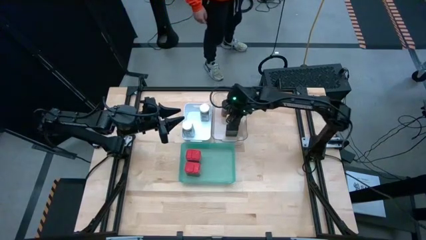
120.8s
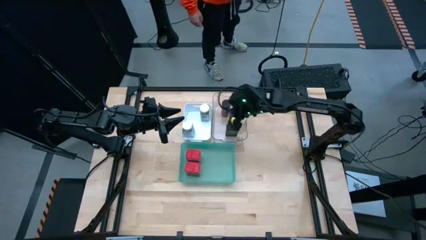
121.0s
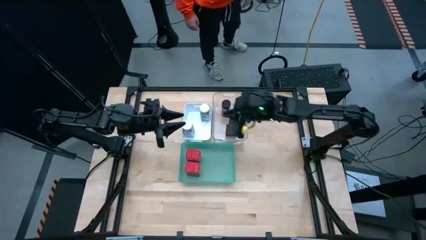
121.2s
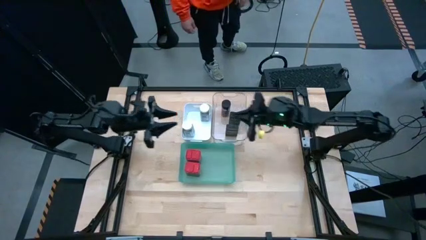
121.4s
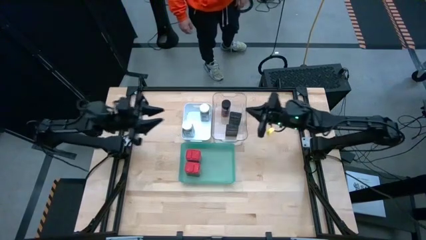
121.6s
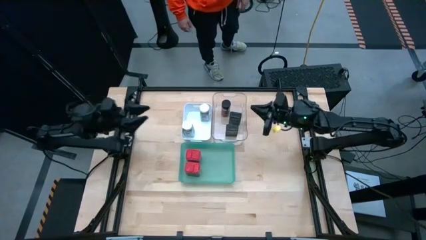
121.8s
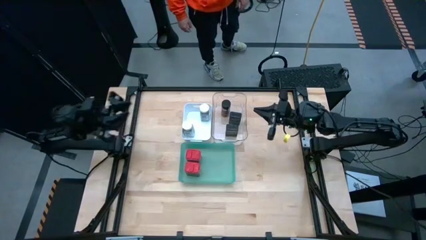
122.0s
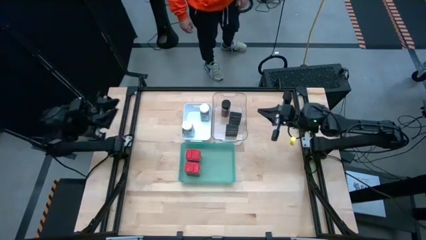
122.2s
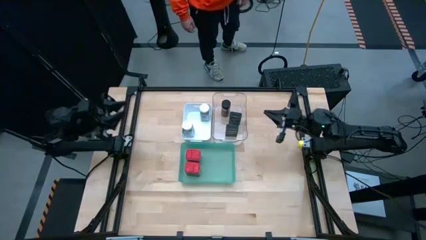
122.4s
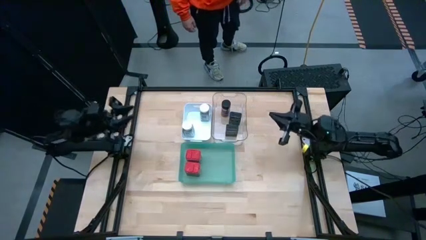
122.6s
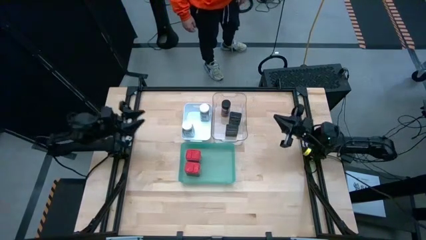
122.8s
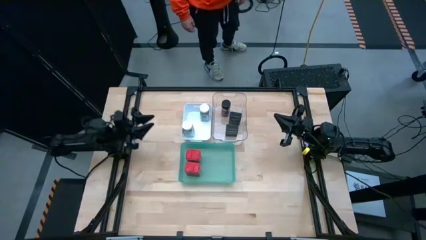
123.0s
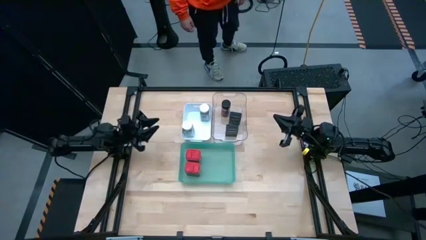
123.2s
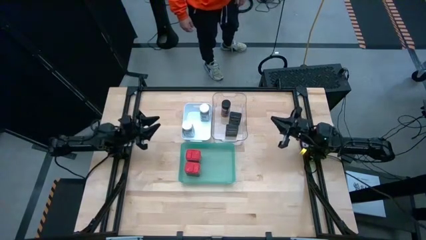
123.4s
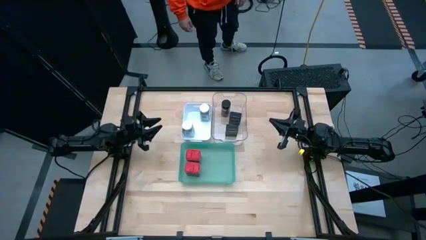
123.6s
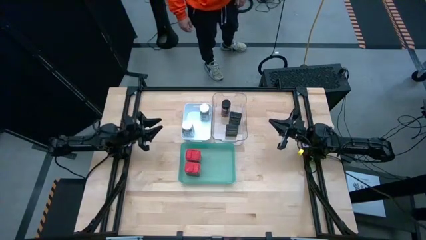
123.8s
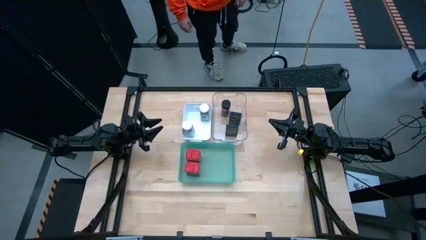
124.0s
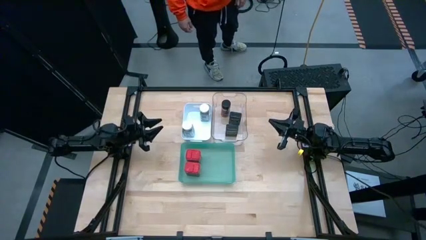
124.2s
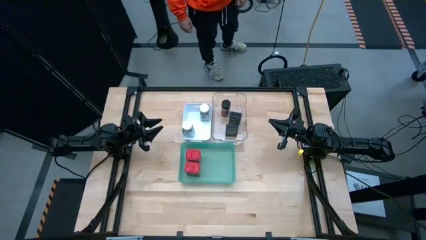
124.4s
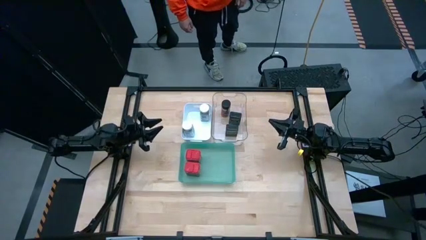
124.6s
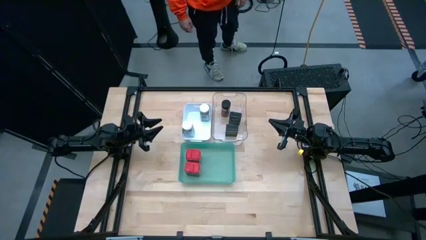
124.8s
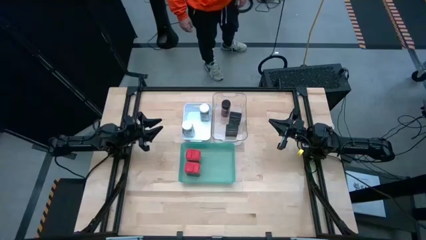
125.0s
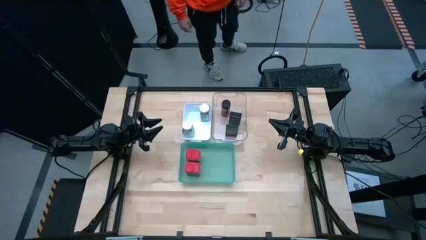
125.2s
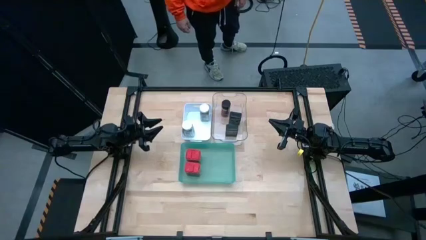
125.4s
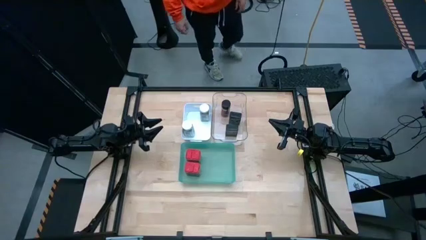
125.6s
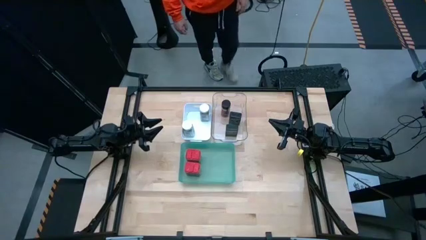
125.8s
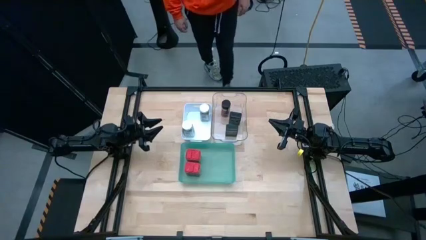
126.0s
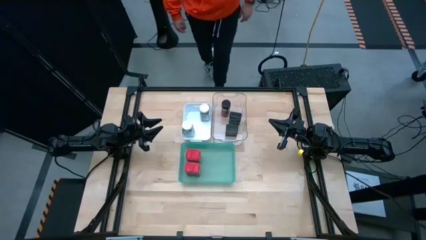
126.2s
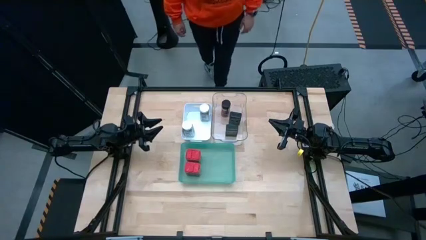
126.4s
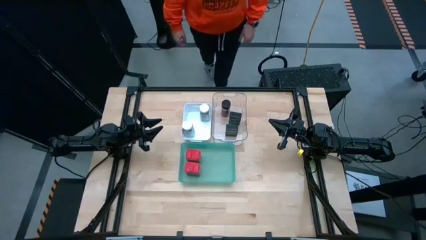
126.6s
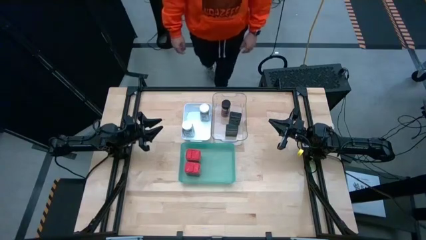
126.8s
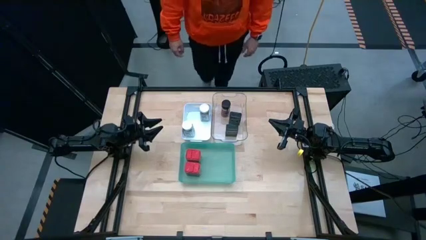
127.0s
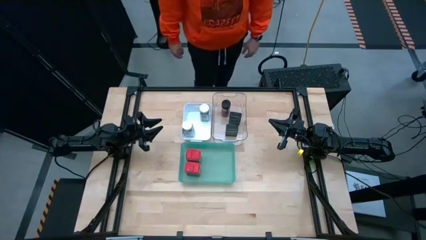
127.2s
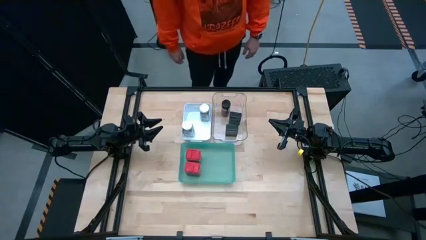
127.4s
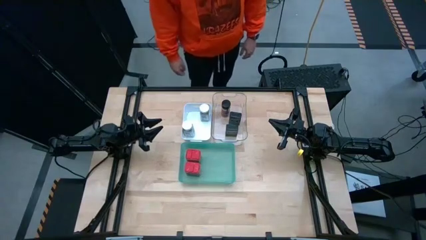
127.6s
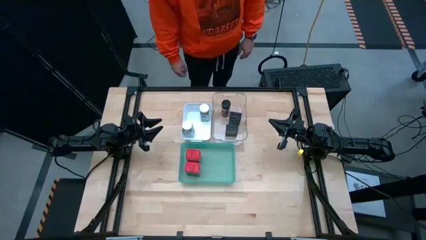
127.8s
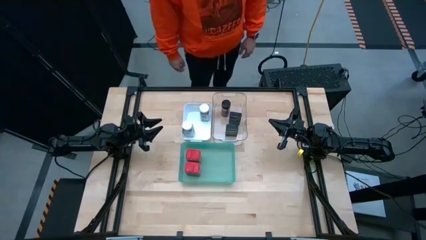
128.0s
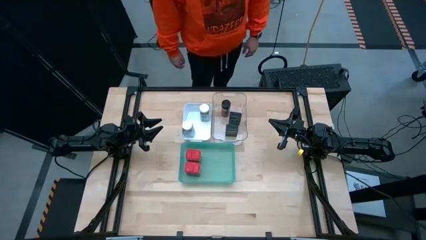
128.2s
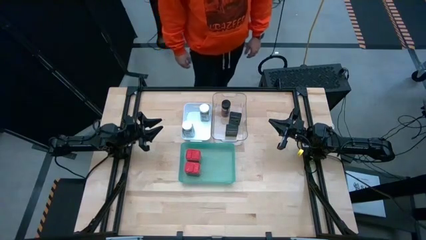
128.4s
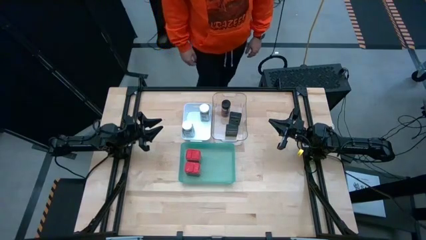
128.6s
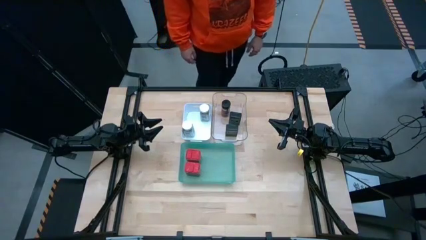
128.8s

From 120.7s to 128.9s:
Task: Sort spices by type
Return to Home Position

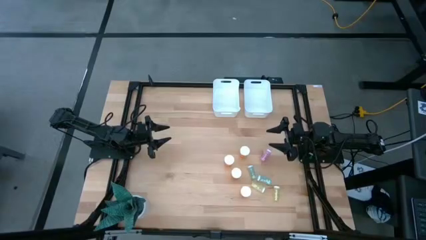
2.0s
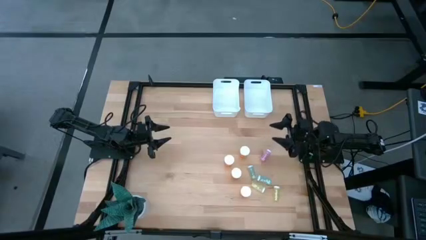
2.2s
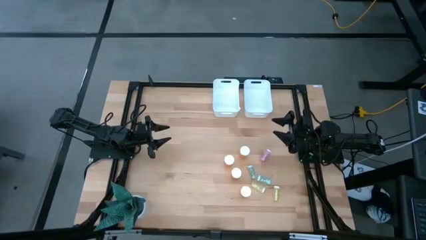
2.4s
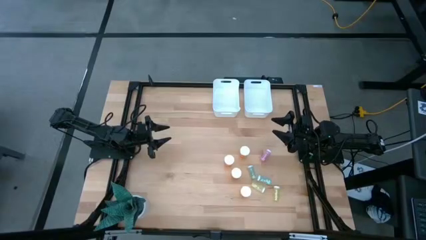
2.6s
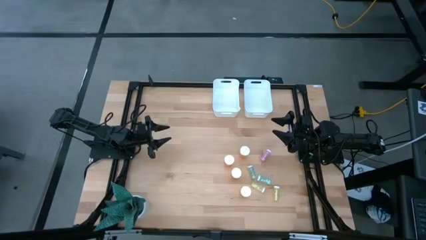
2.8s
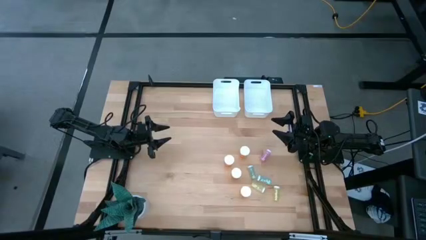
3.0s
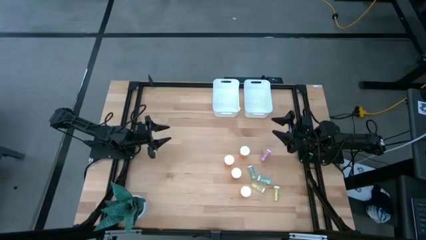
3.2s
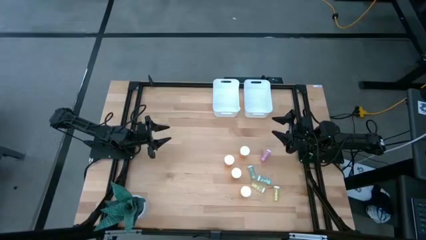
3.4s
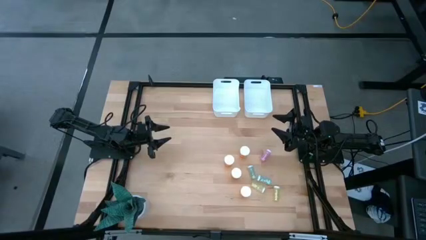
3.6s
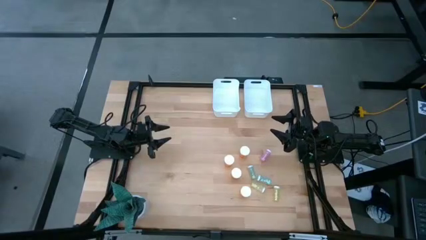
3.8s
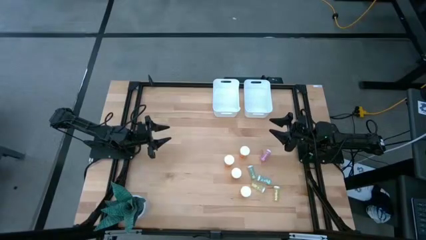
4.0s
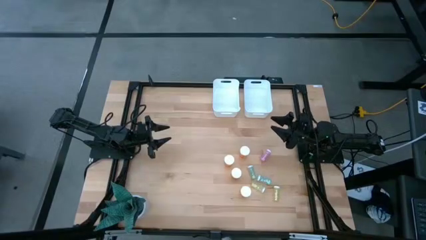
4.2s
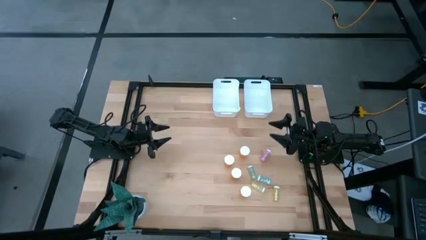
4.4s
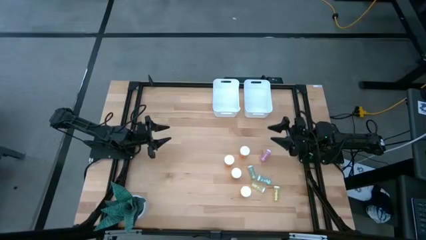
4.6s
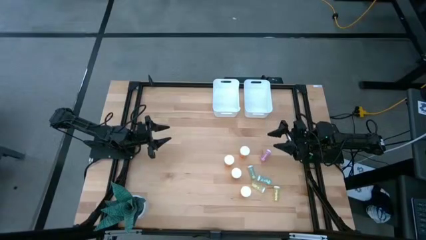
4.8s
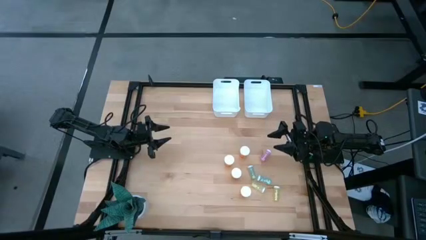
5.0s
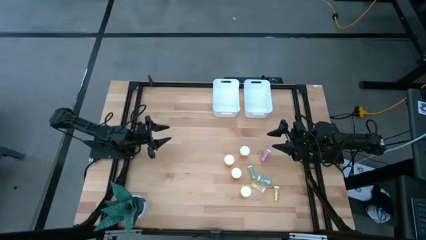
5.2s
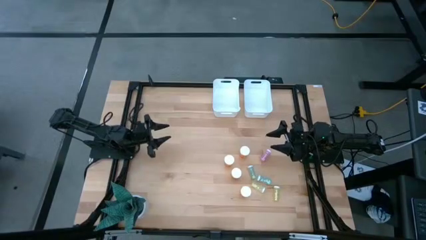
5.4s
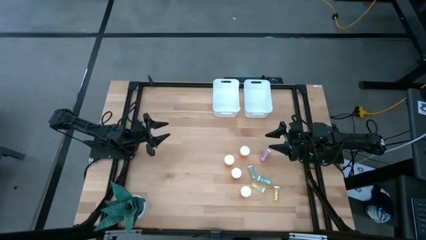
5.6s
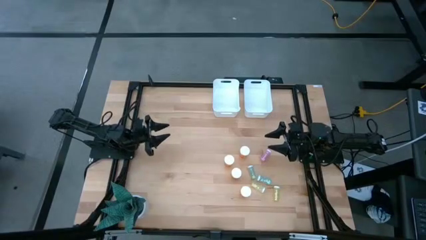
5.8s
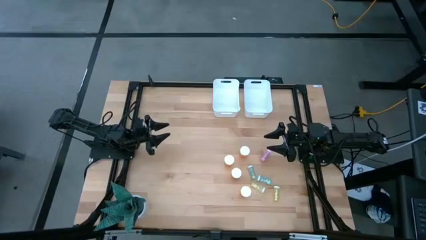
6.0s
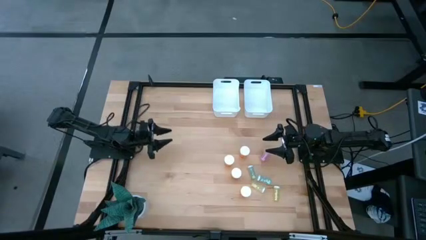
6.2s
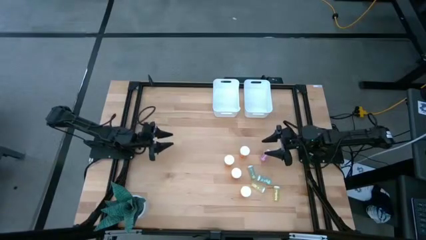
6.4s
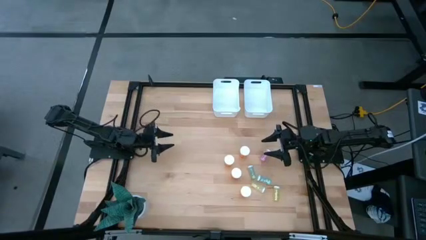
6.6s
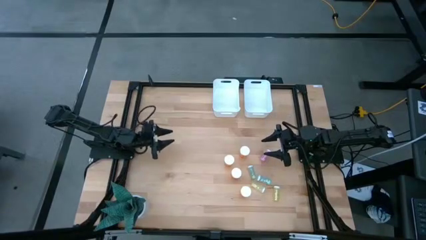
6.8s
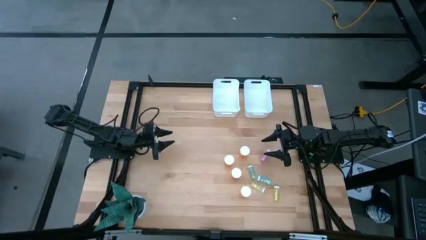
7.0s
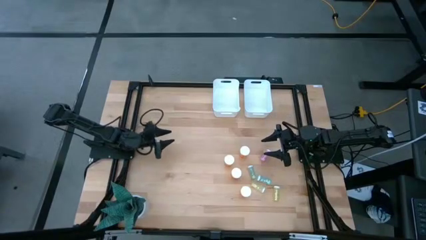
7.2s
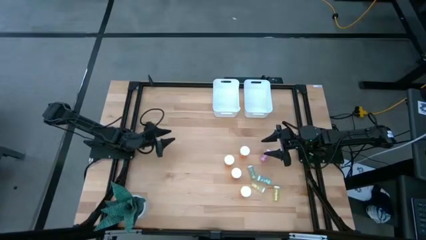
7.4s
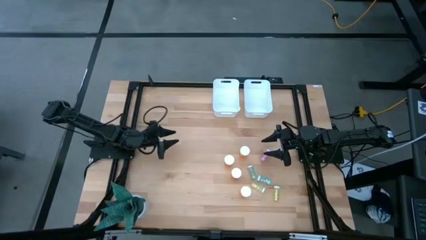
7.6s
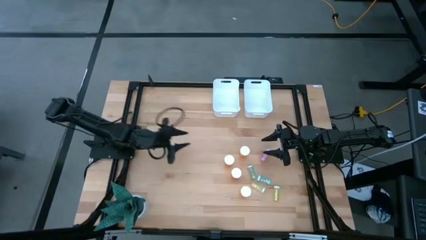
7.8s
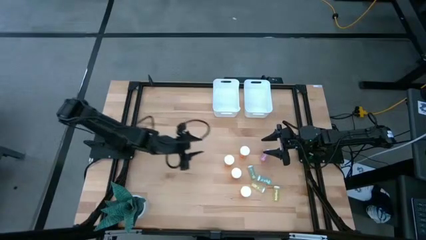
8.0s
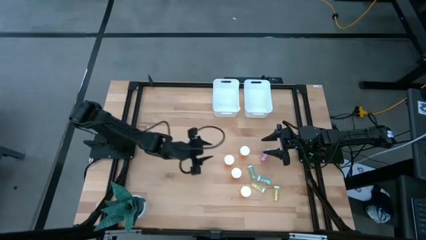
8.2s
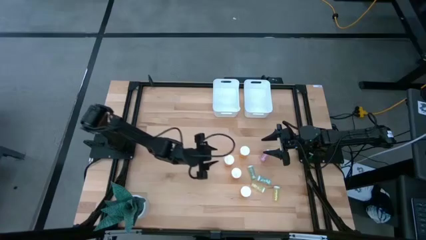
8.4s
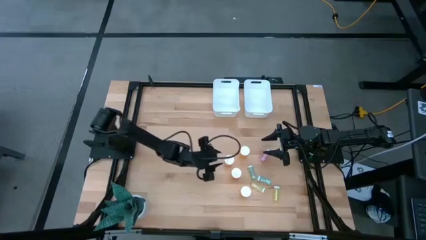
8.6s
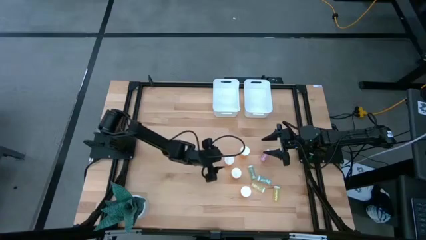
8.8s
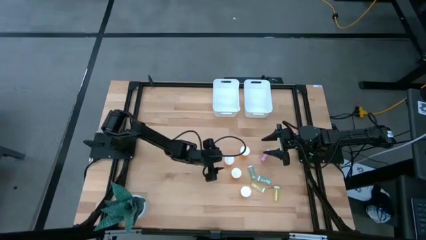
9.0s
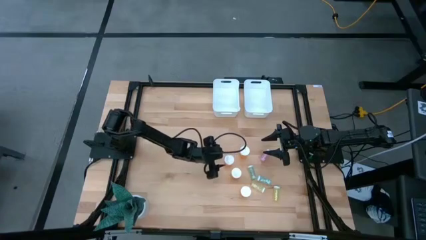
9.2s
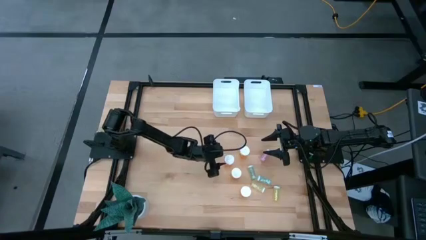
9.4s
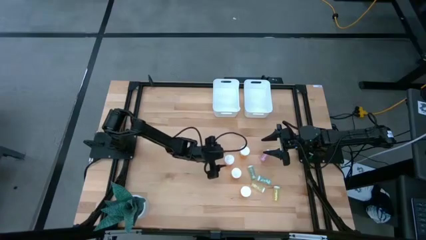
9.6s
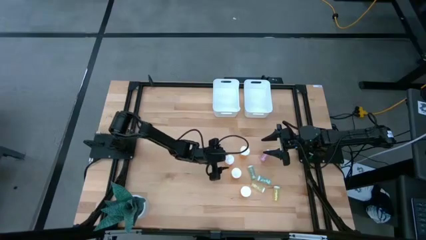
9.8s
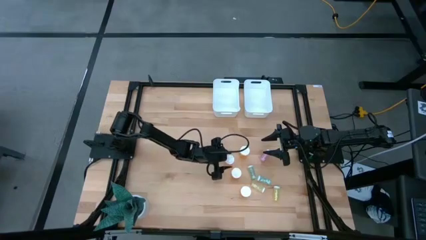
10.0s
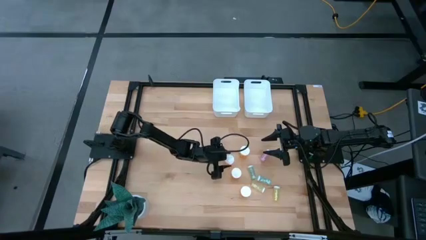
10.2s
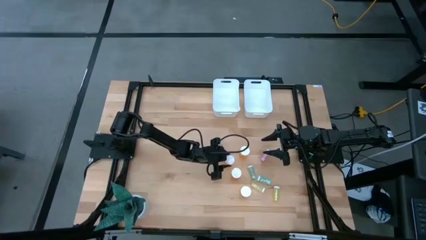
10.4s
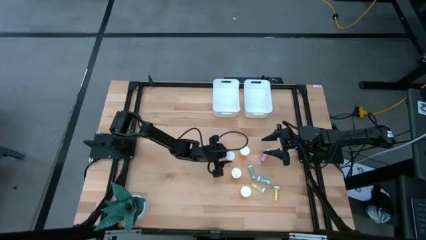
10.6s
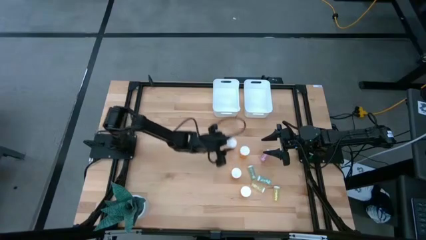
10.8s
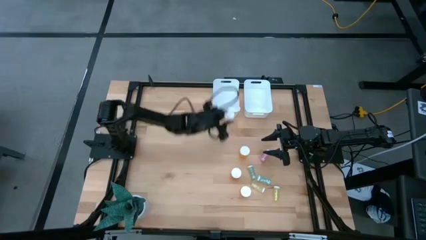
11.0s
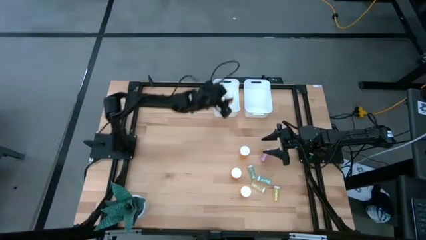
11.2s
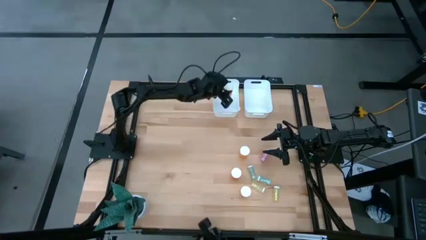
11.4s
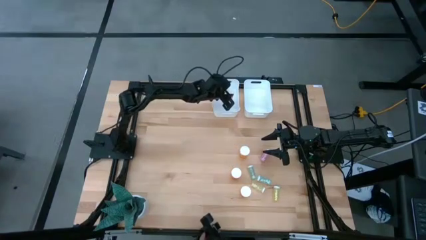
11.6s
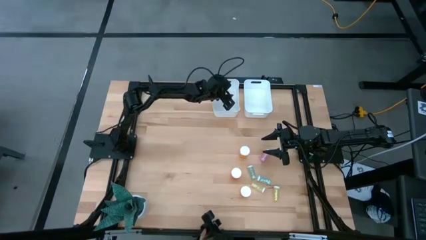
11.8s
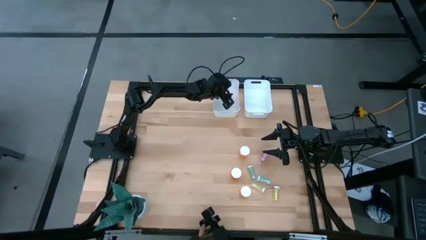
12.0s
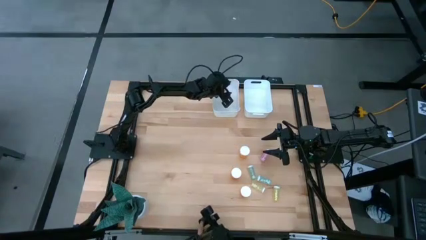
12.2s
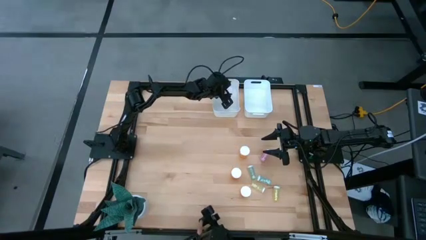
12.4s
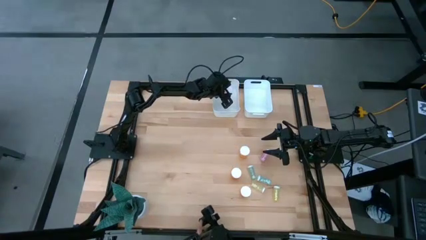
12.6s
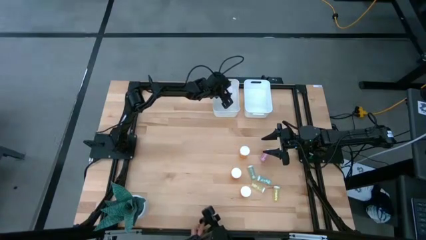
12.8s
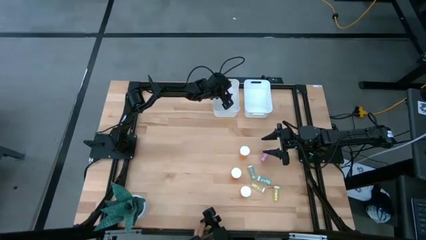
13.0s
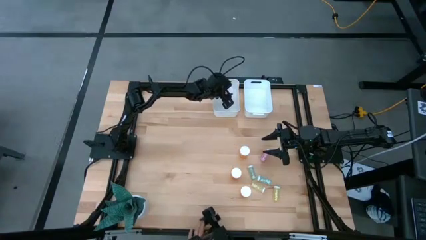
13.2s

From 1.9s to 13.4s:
Task: Pick and place medicine bottles into bin by pill shape (circle, oval)
Put the large orange medicine pill bottle into the left white bin
